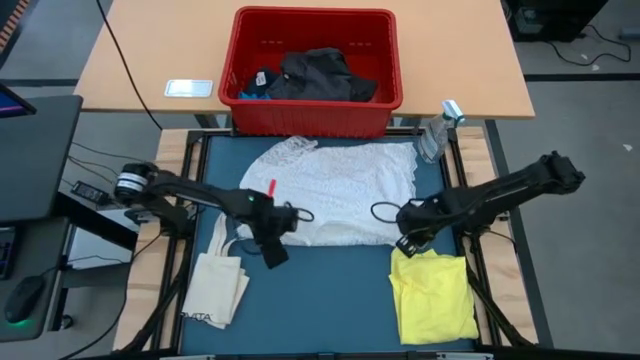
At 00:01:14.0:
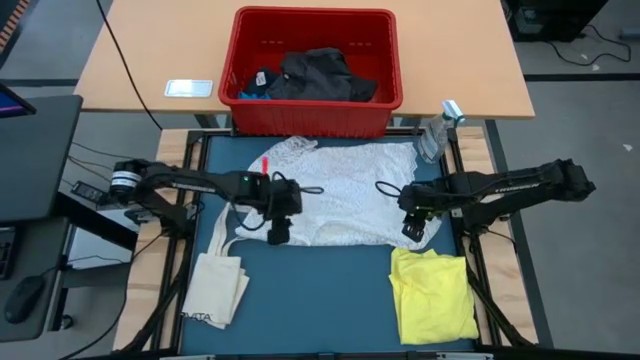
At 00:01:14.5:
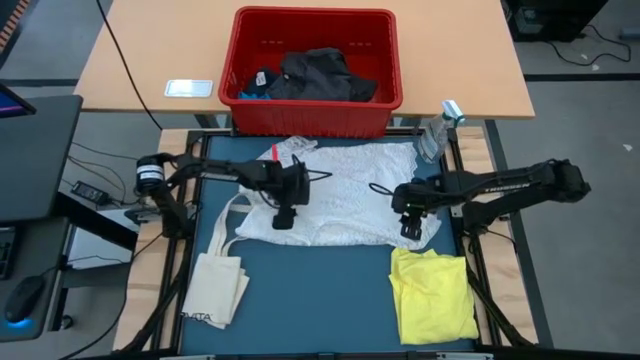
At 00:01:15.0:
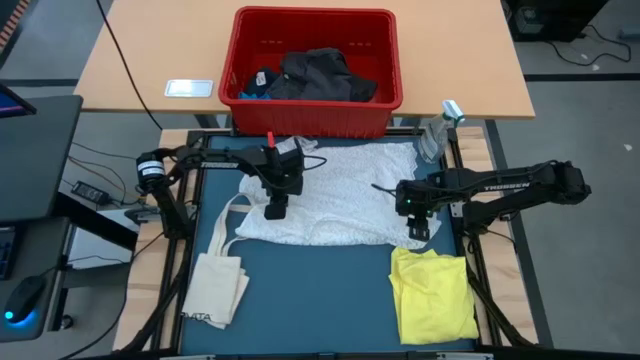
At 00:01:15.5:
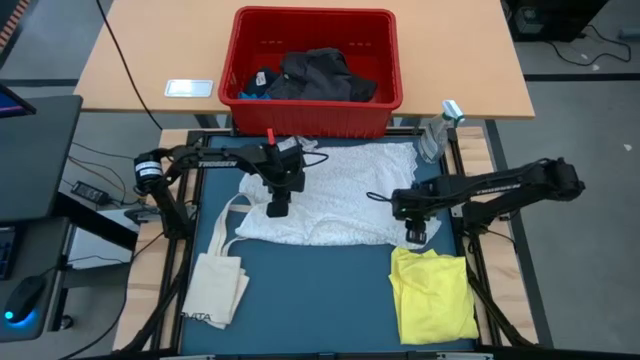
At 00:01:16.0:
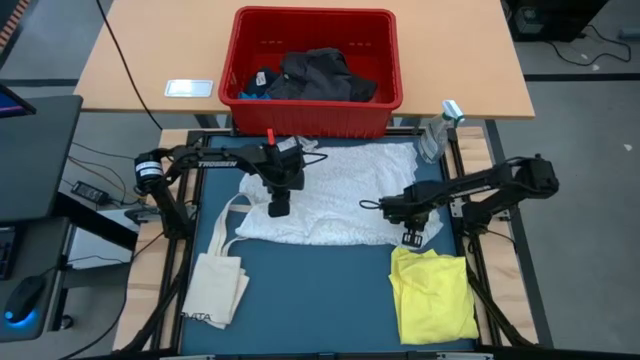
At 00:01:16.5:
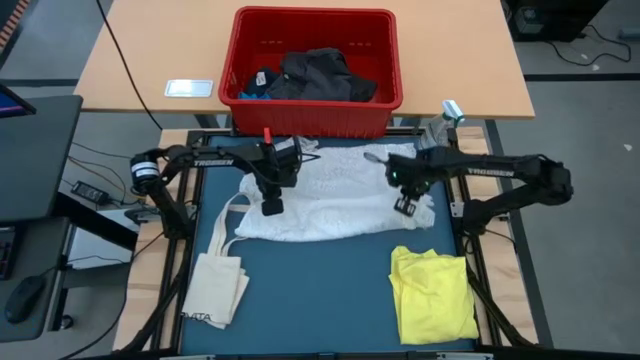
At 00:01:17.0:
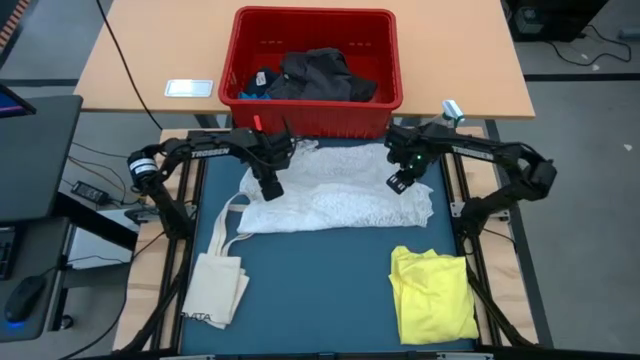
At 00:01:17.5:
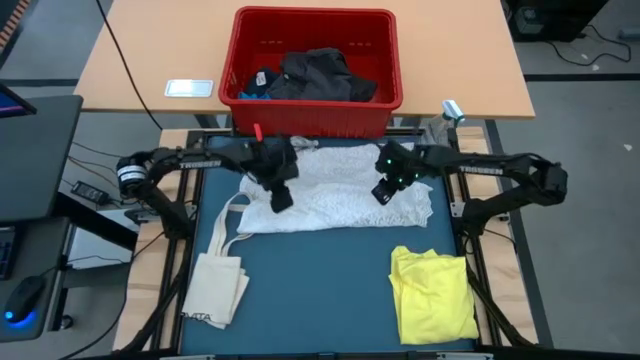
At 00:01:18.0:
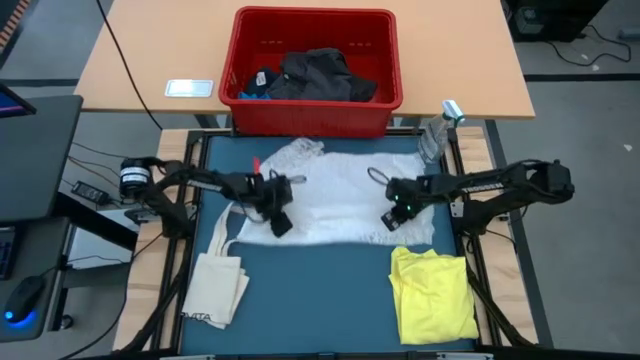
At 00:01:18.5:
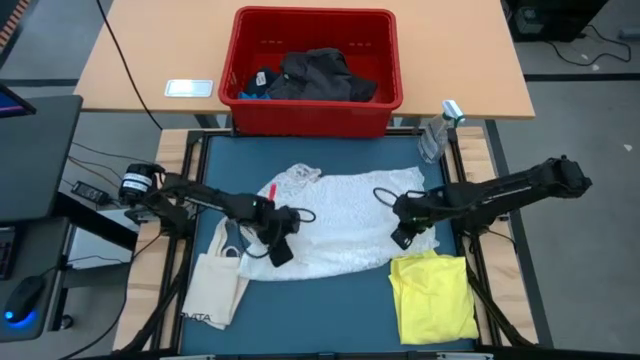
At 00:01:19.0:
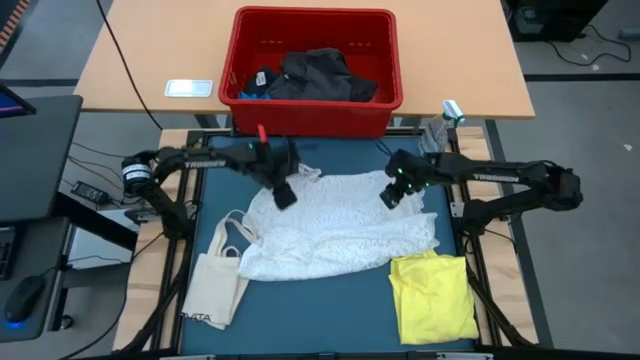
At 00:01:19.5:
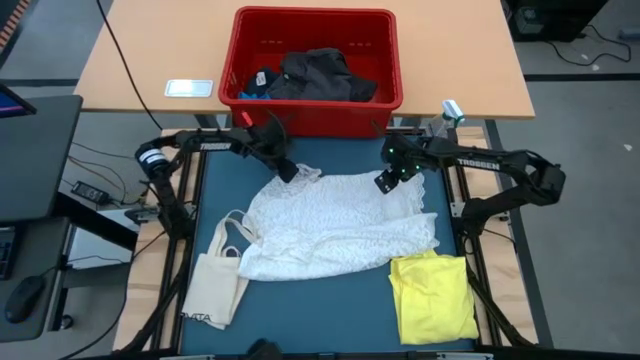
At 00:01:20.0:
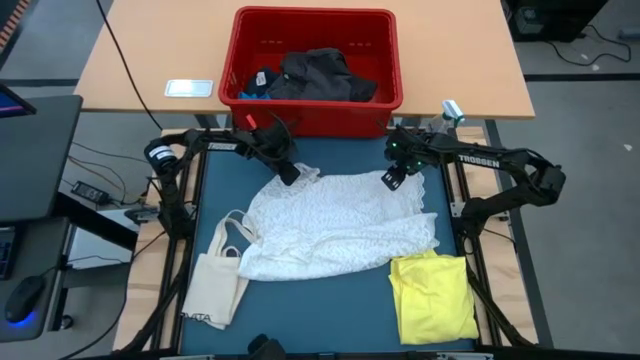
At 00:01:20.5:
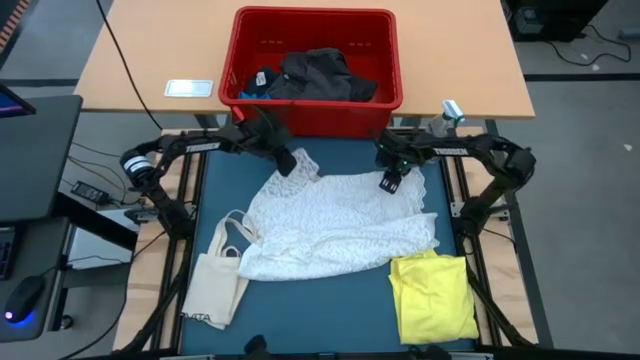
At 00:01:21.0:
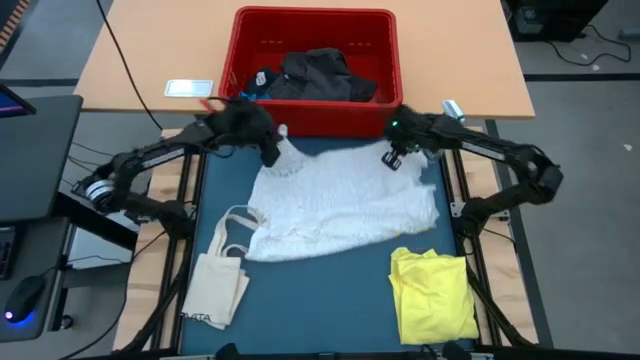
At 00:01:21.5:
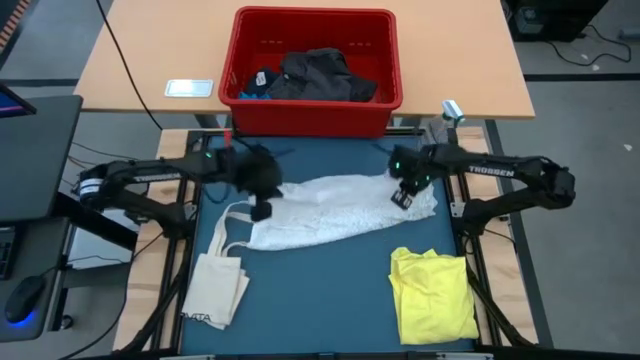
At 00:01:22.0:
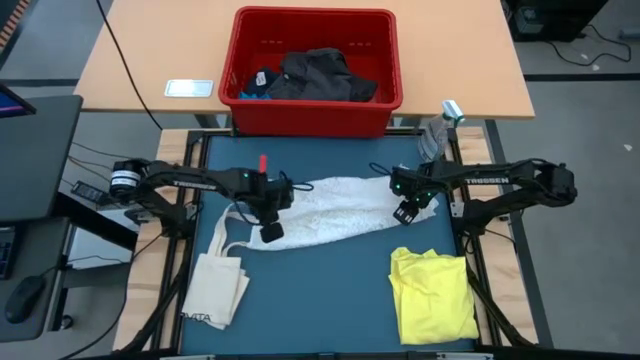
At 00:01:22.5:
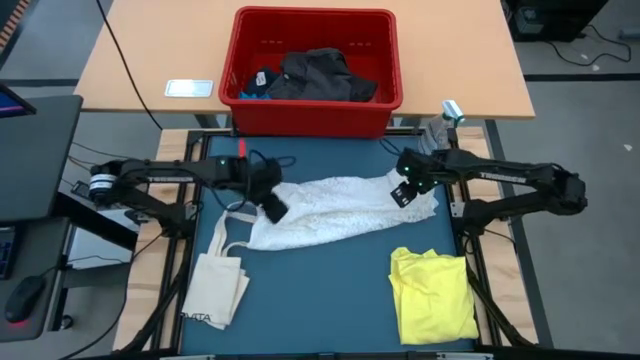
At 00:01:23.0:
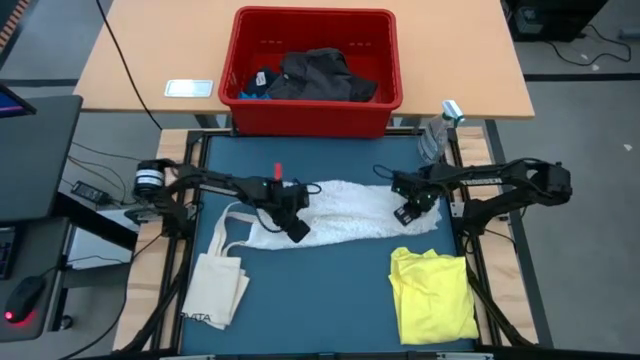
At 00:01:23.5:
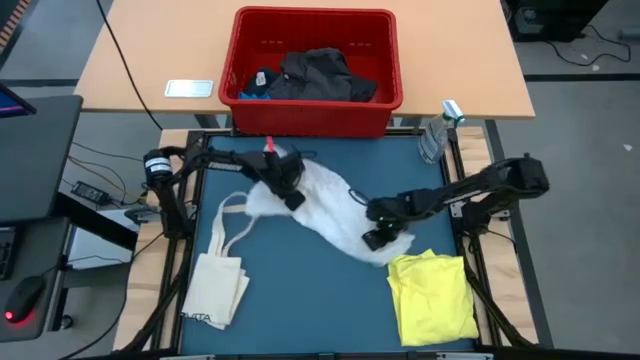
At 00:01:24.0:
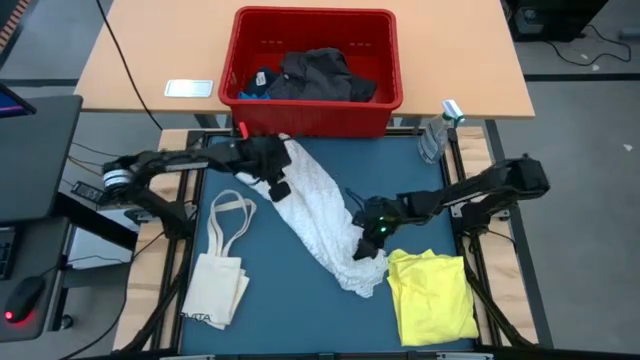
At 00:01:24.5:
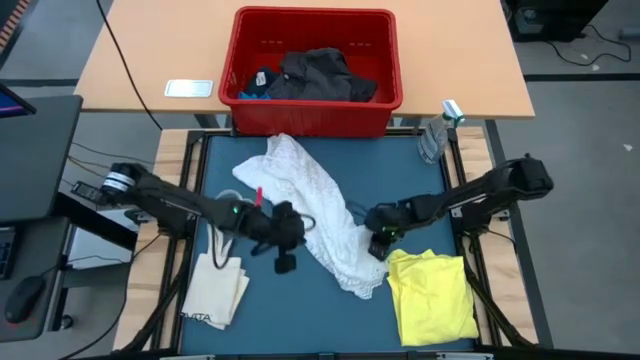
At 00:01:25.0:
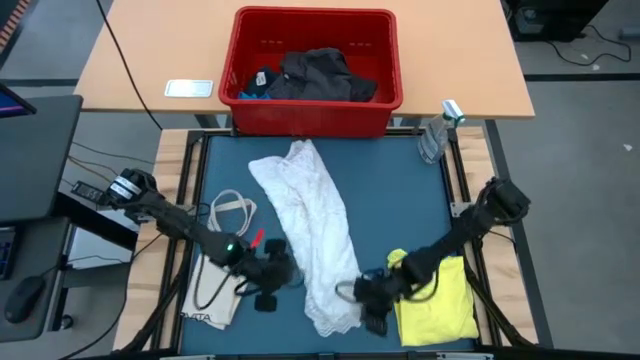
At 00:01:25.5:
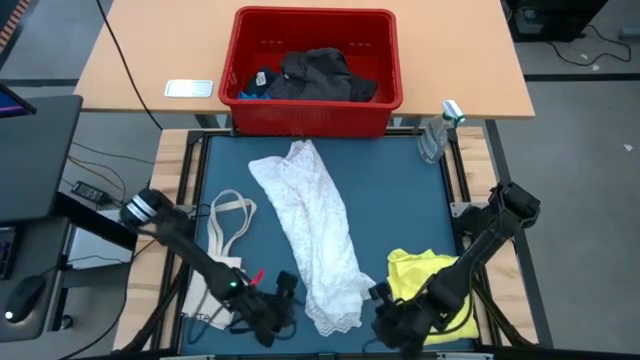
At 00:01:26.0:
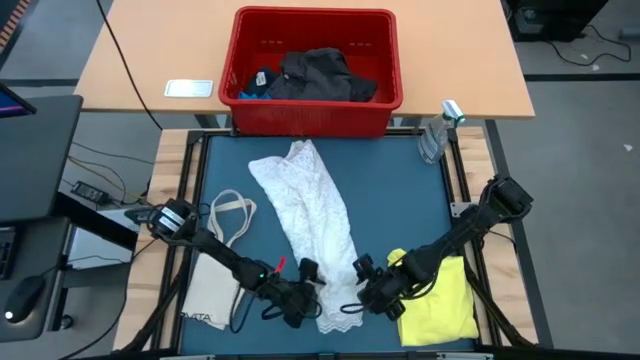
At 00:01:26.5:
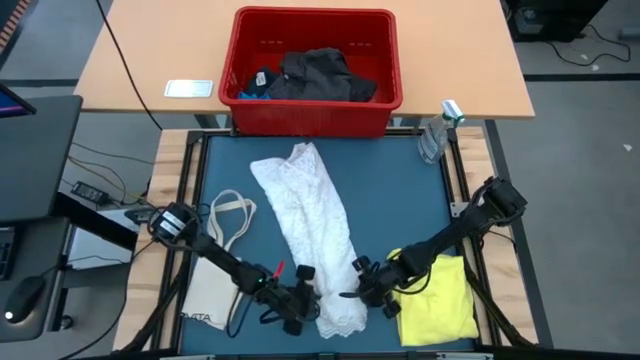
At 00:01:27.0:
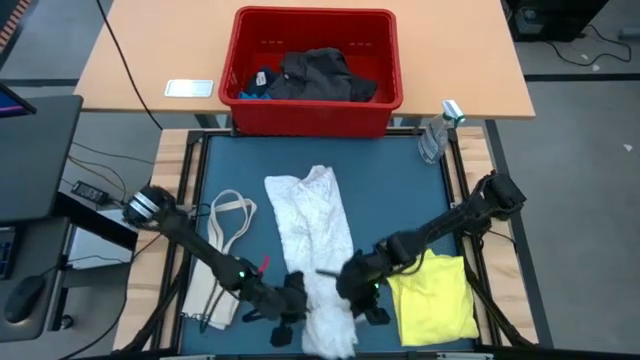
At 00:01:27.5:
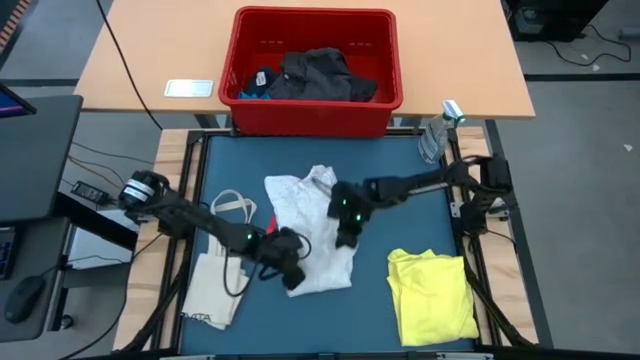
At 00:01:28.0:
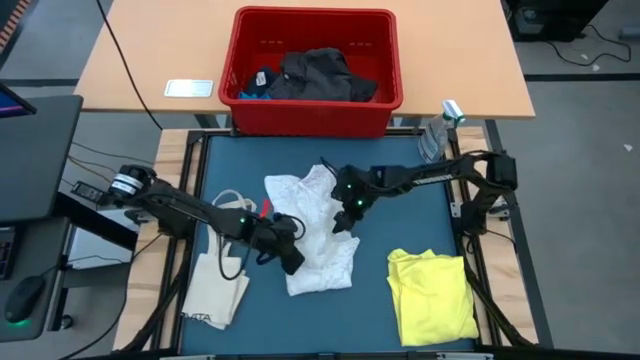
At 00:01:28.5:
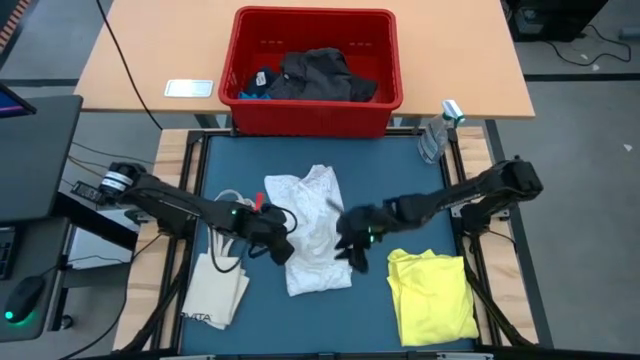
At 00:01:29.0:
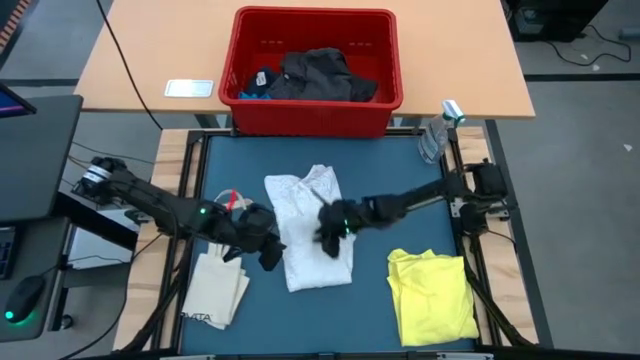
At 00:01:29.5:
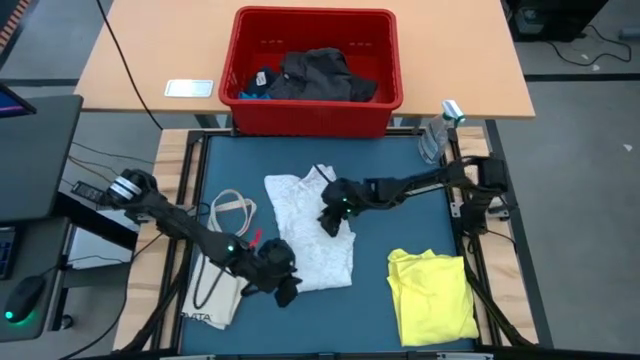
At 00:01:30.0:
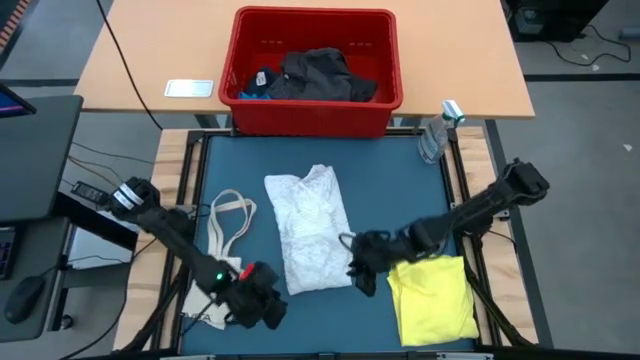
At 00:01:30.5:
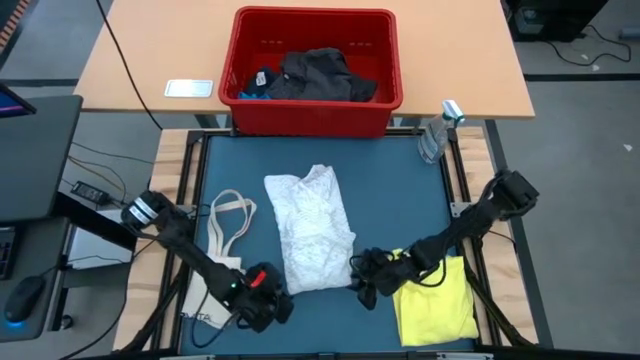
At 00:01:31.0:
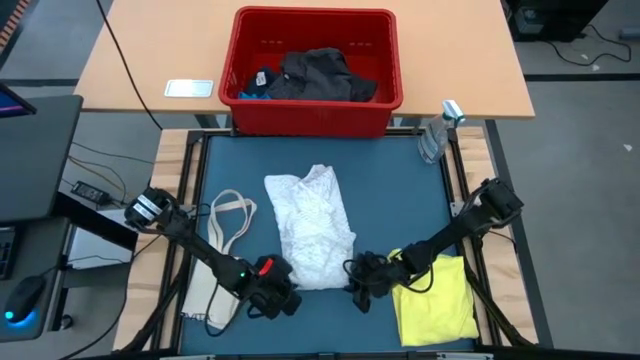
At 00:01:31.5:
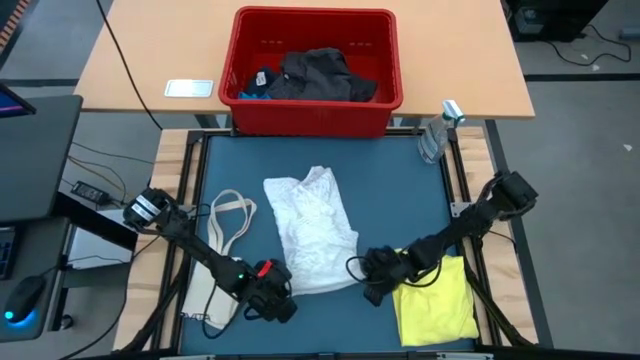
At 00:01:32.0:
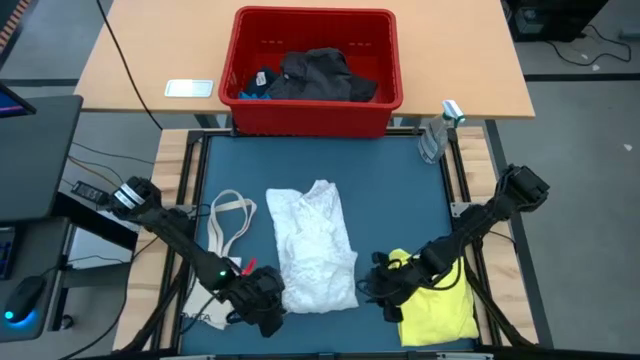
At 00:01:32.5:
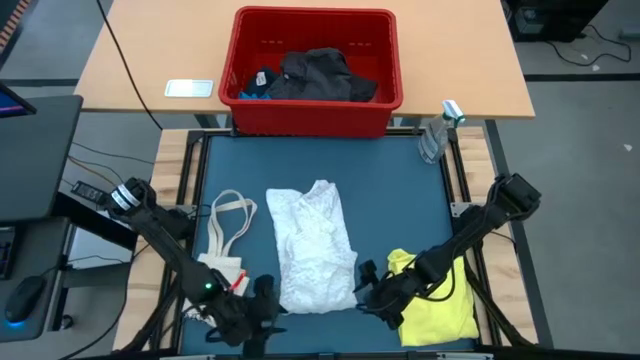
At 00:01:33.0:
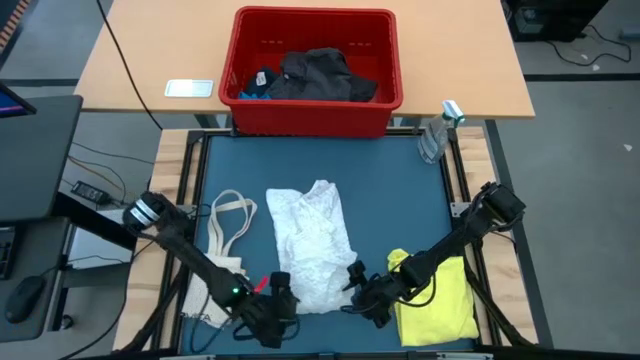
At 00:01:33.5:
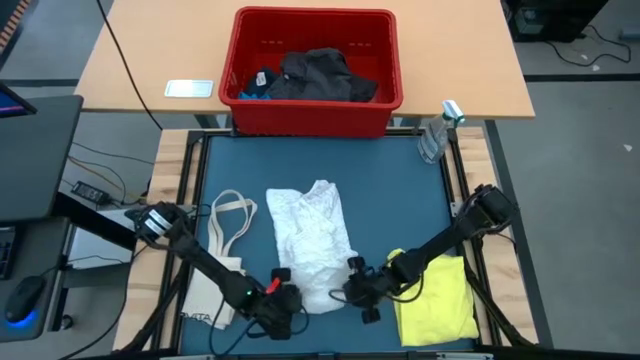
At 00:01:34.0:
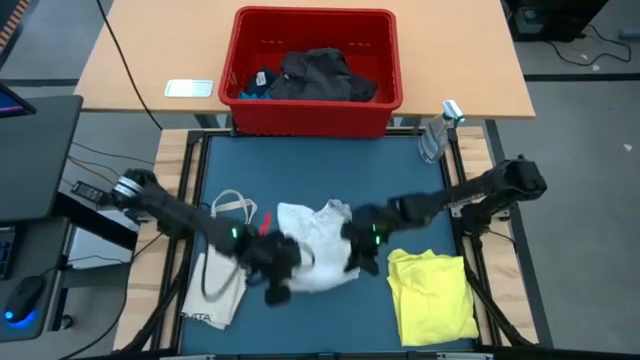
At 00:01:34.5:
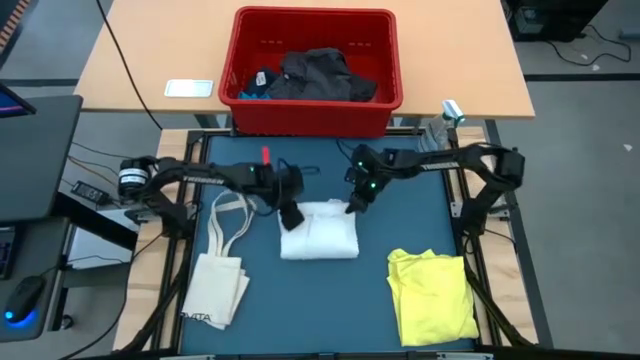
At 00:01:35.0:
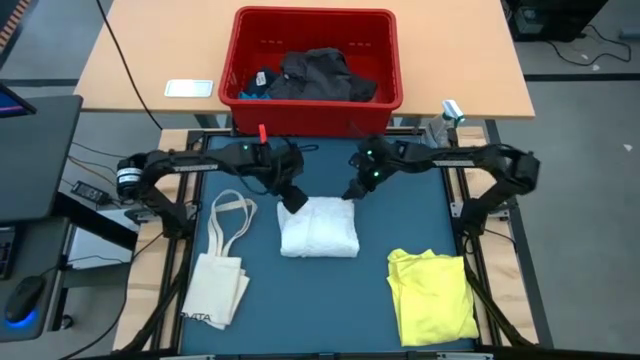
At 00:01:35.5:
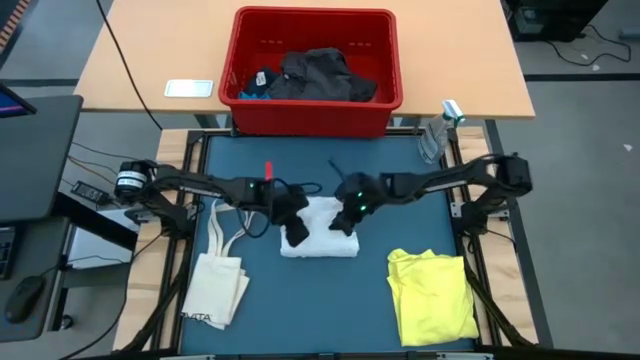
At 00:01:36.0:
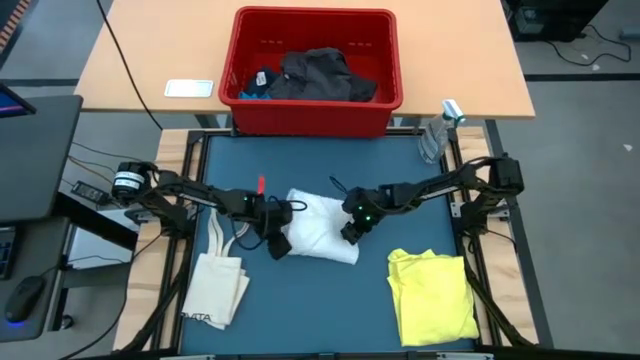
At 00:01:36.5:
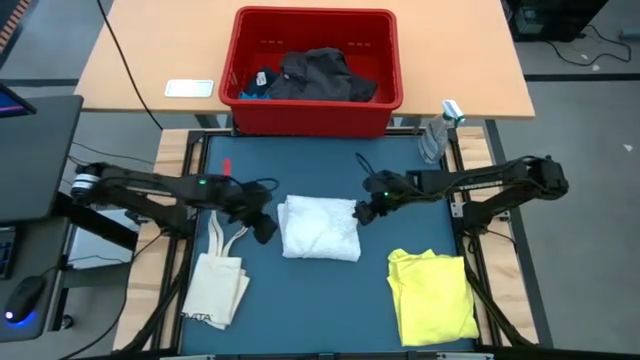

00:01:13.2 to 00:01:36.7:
Task: Fold laundry
Fold the white cloth
